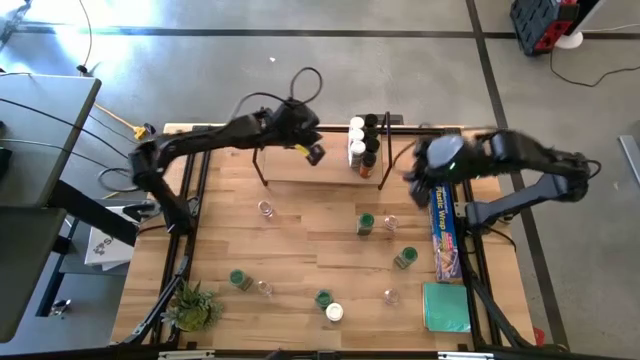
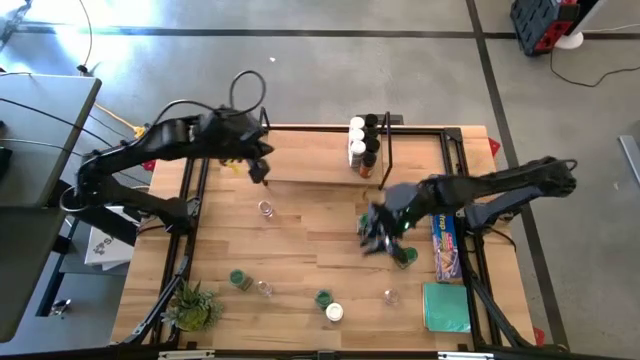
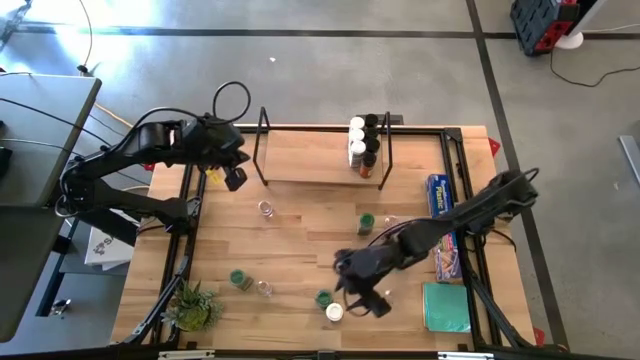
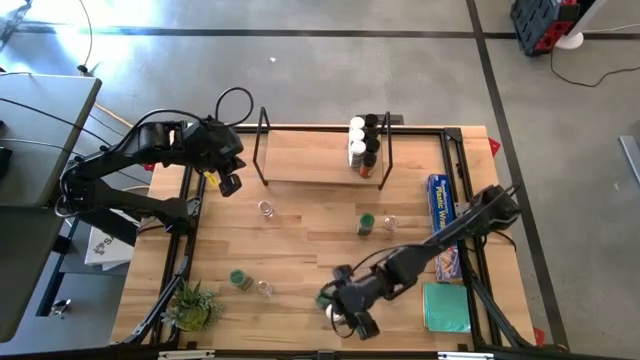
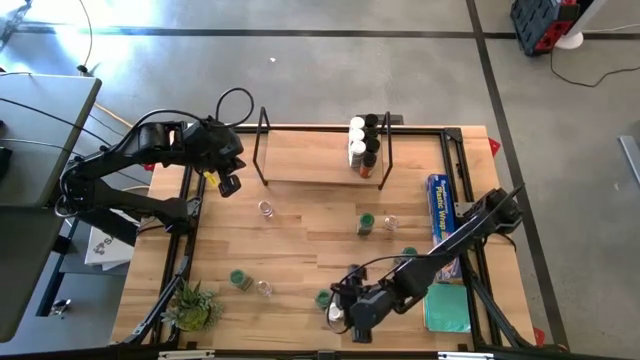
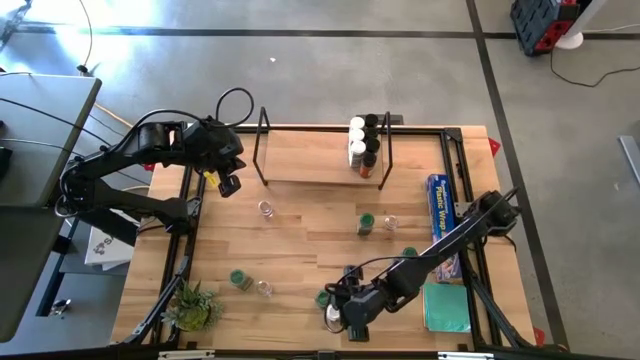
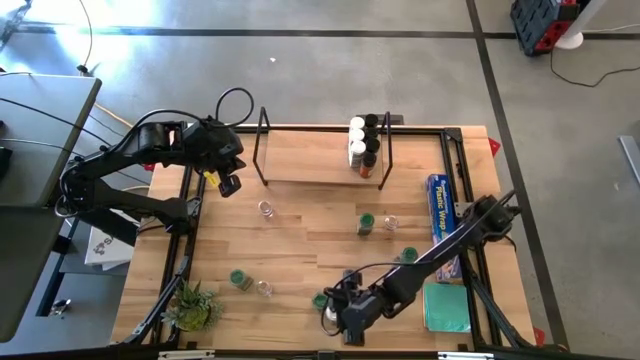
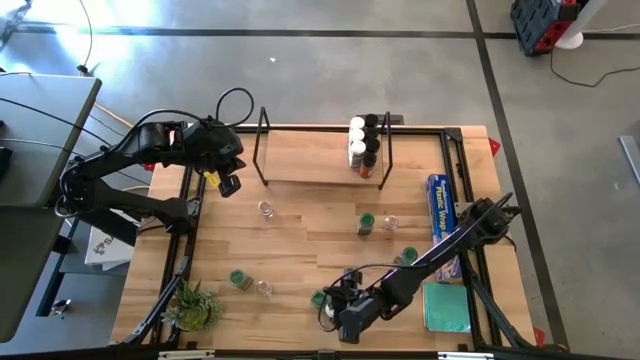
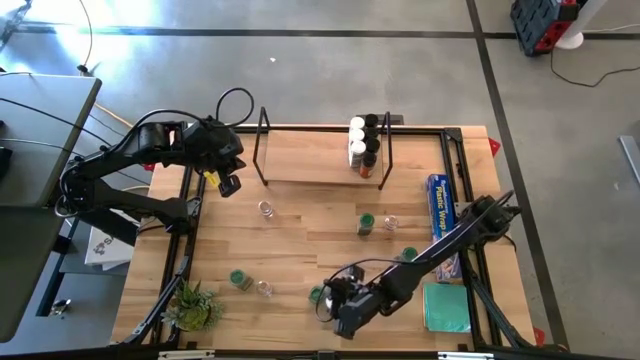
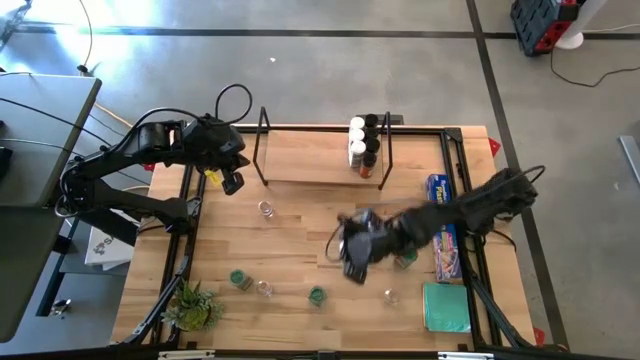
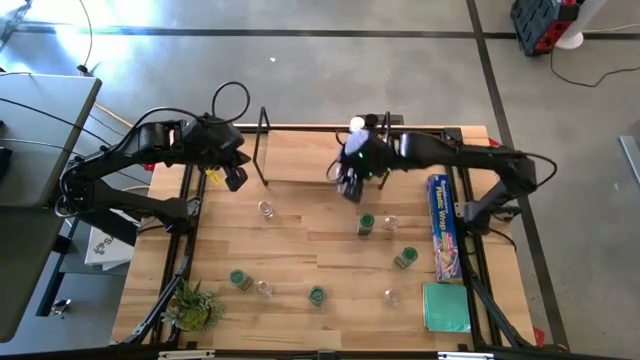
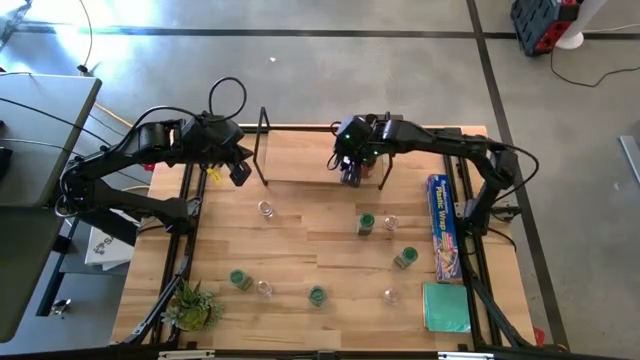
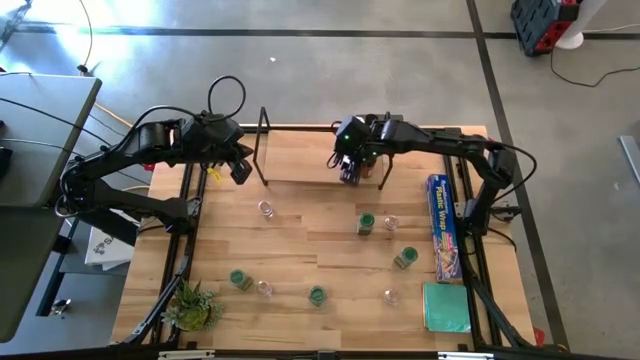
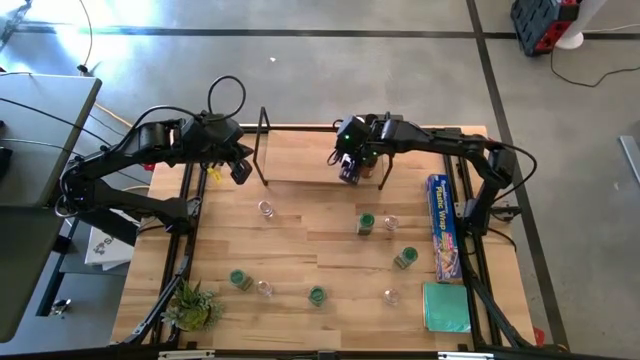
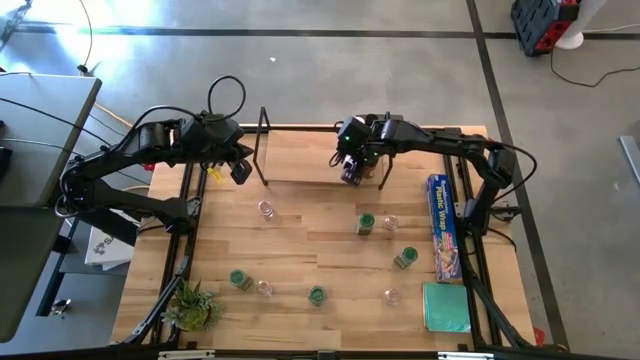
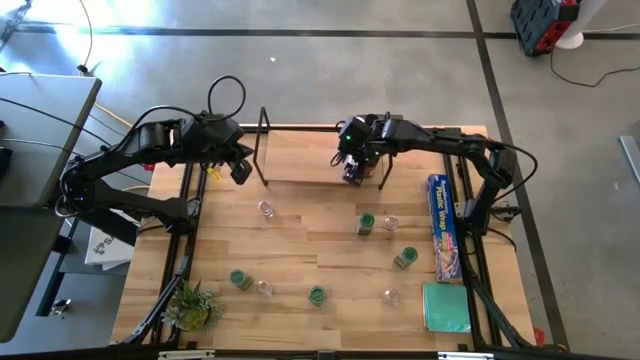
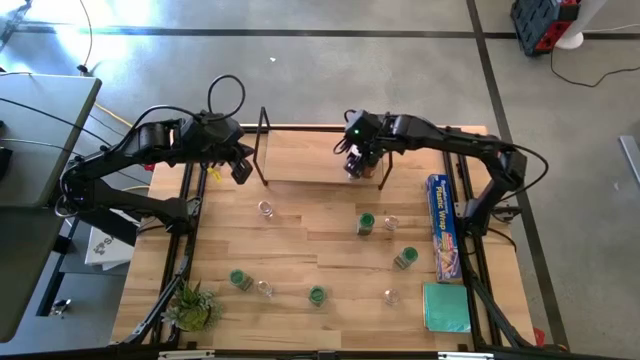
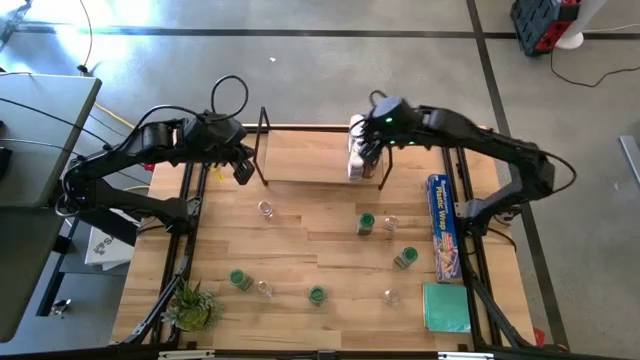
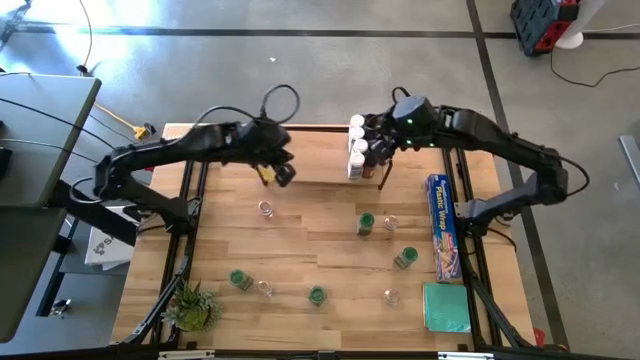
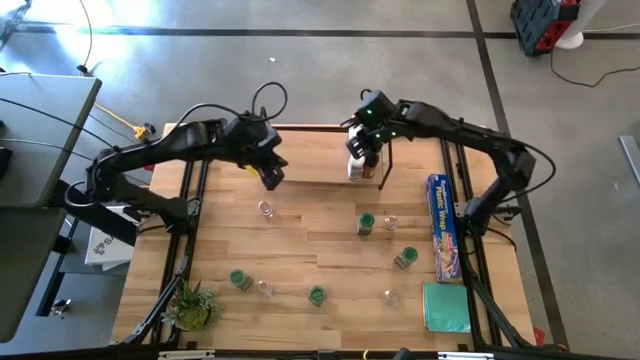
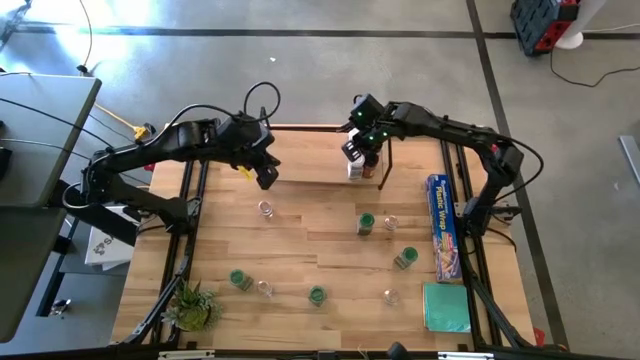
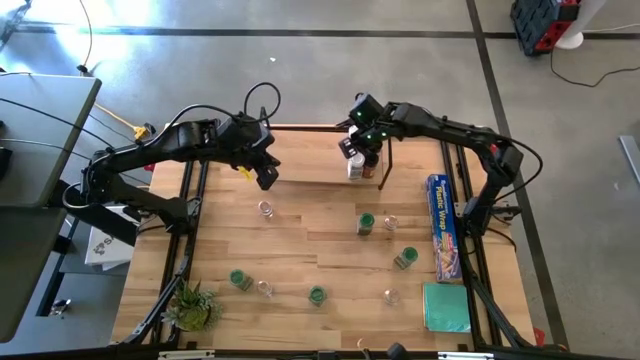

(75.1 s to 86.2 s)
Task: Shelf spices
Put the white seasoning bottle on the shelf aligned with the other white seasoning bottles

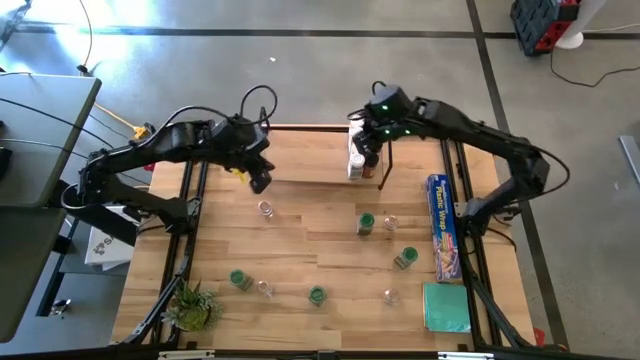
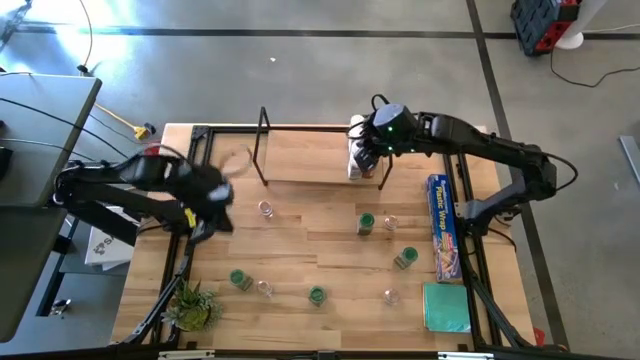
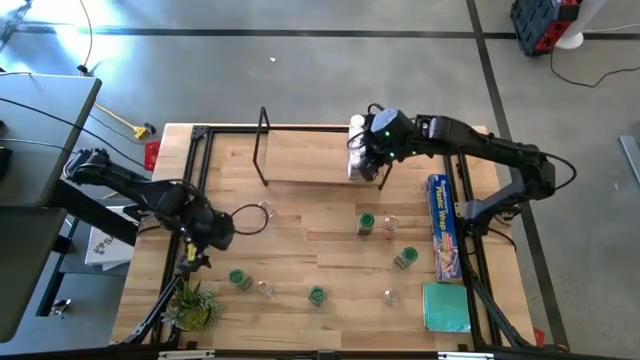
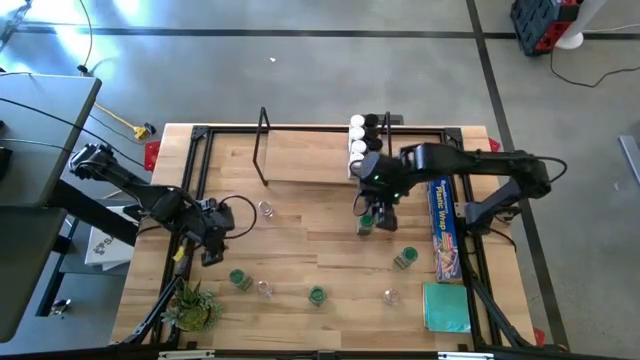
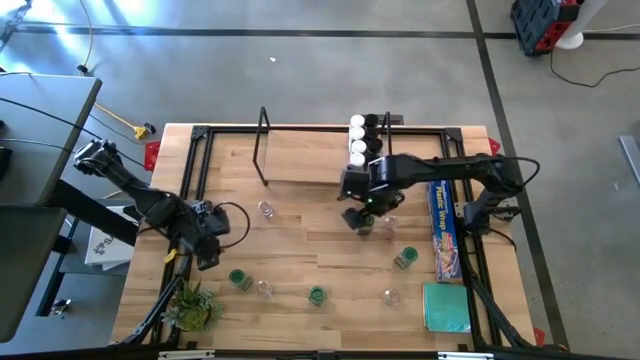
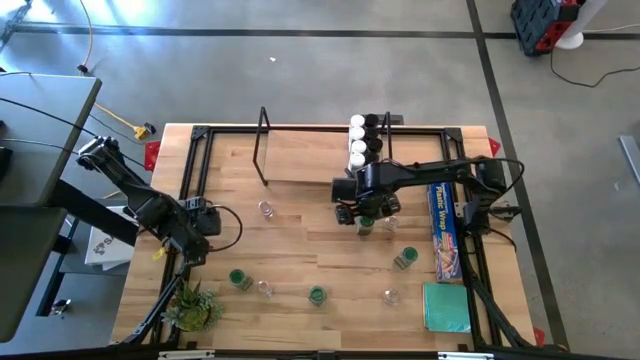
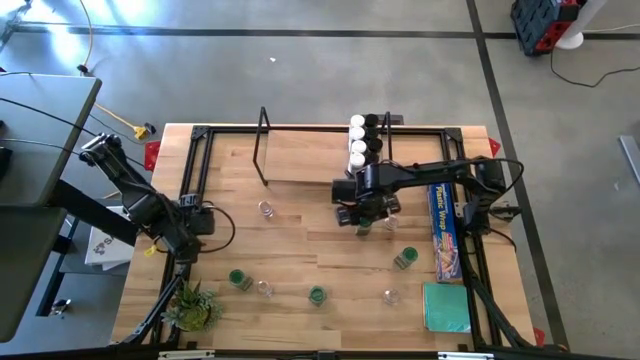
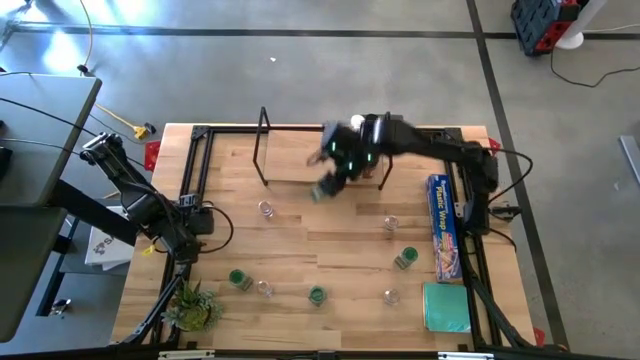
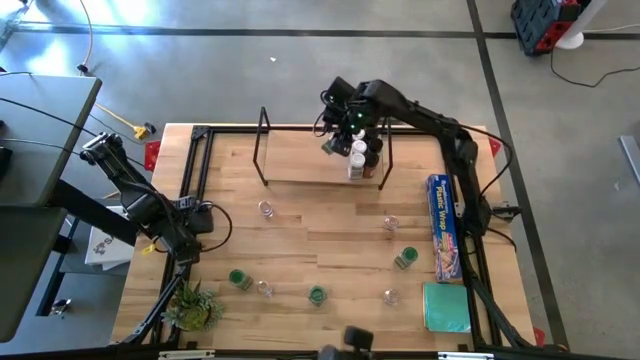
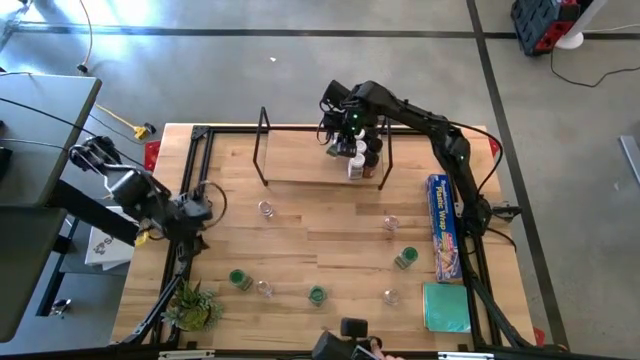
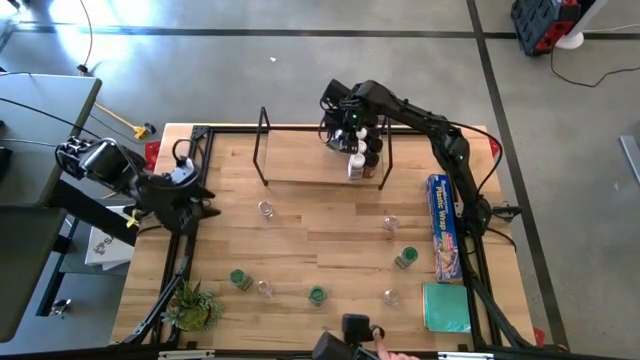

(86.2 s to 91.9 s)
Put the green seasoning bottle on the shelf

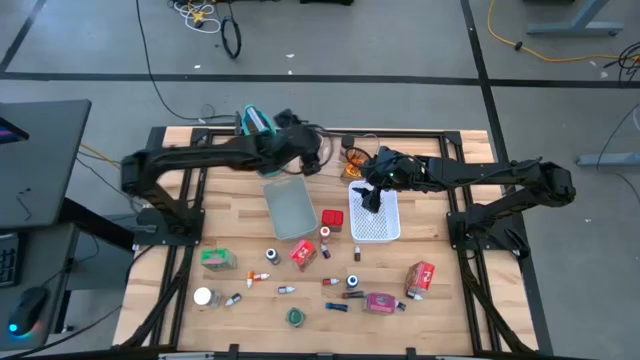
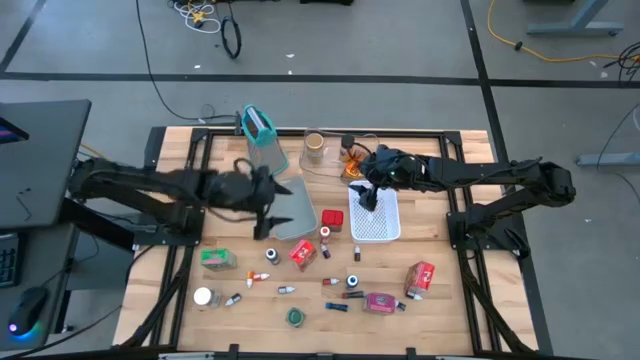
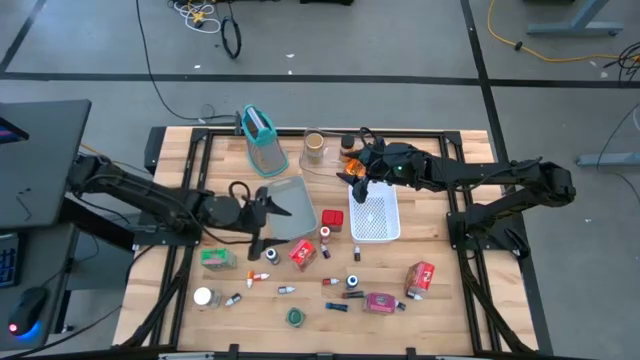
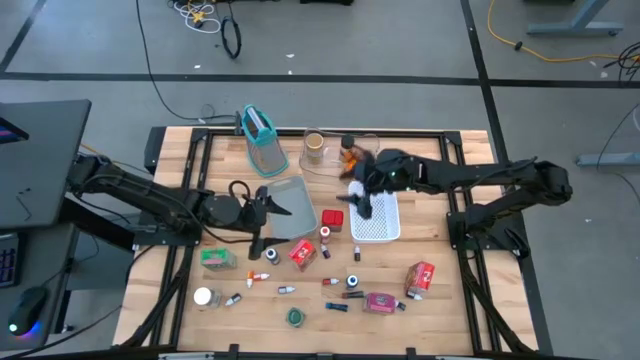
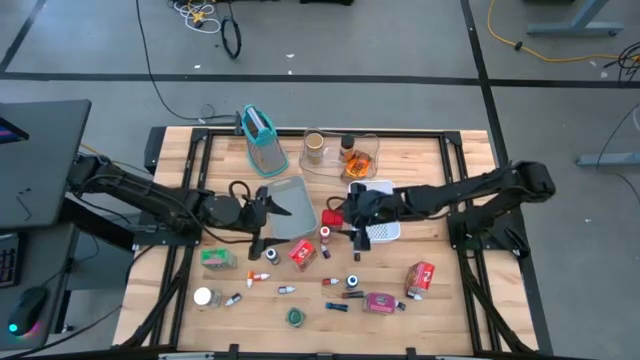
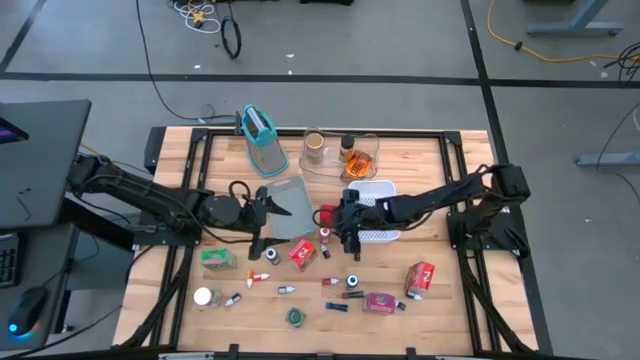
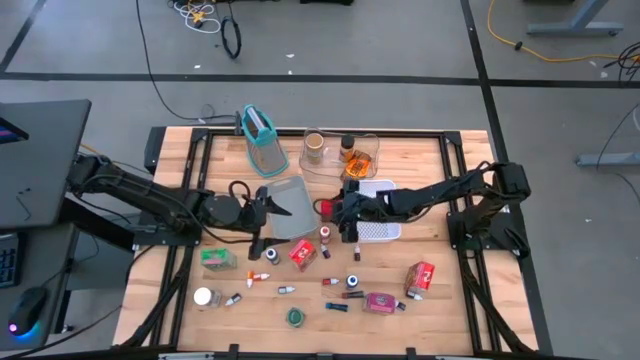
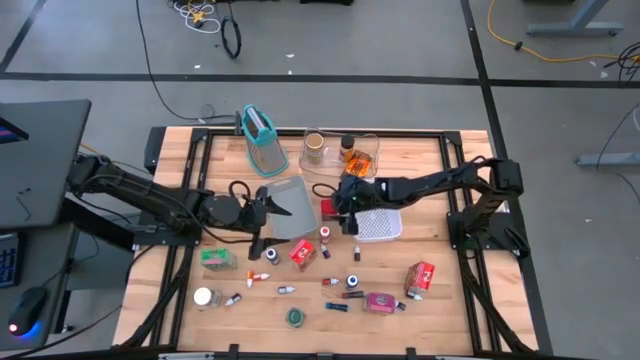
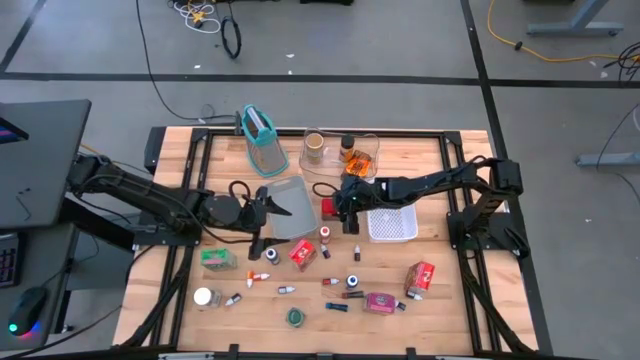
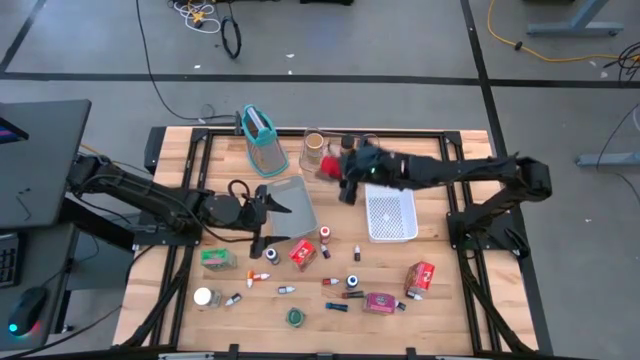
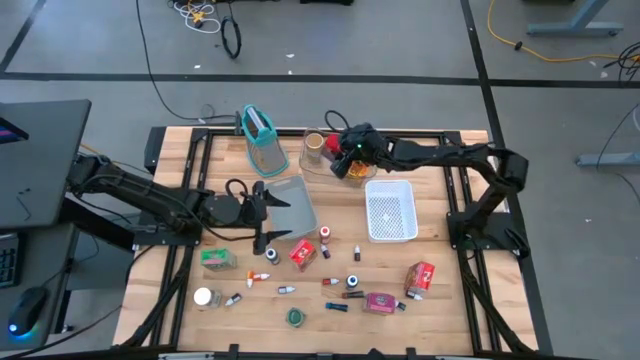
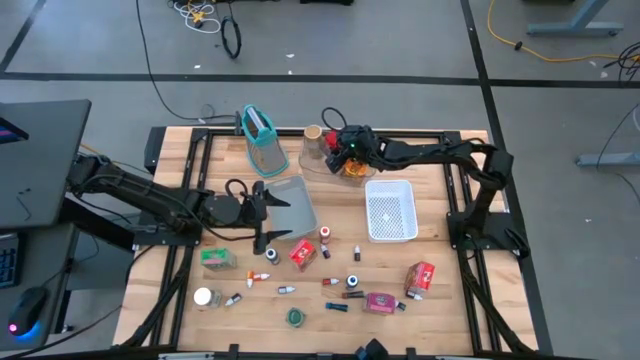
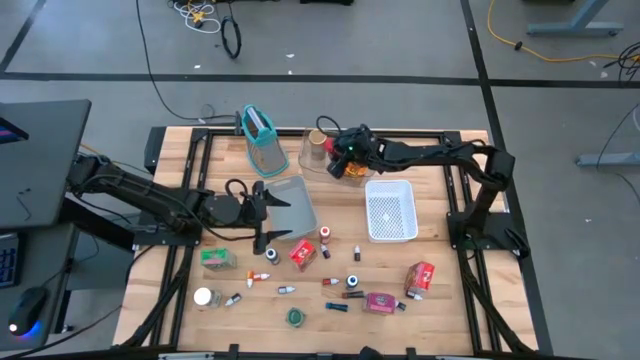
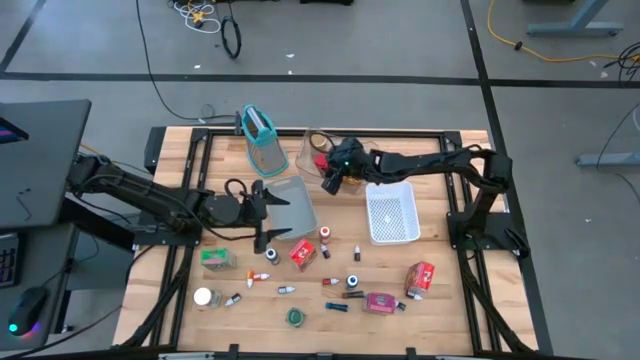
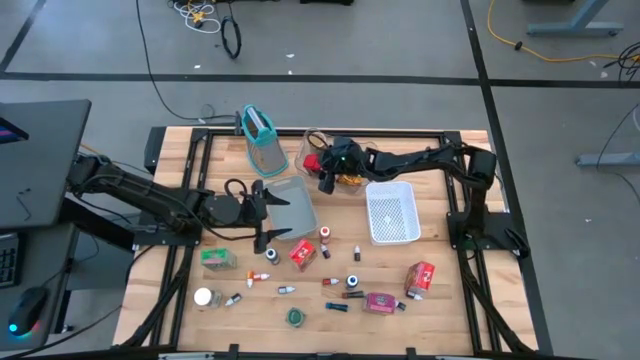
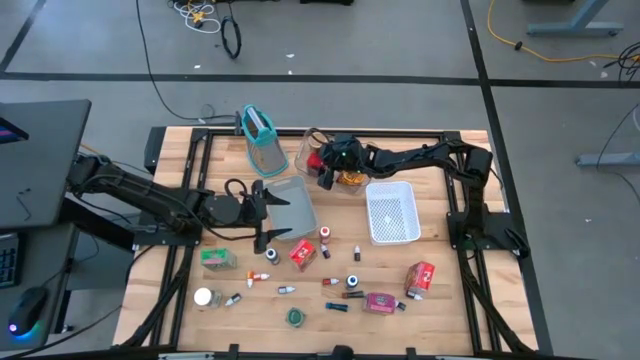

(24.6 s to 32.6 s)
Task: Pick & Place Kitchen Items
Put the red seasoning can into the transparent bin
